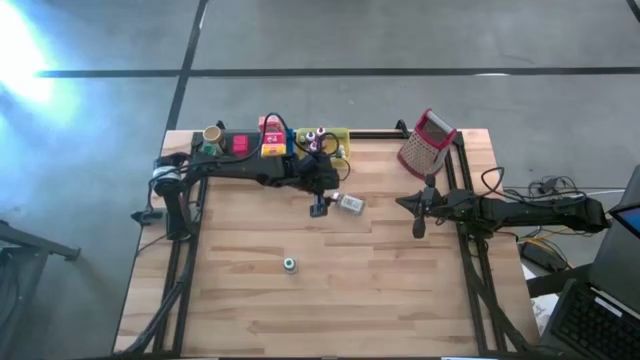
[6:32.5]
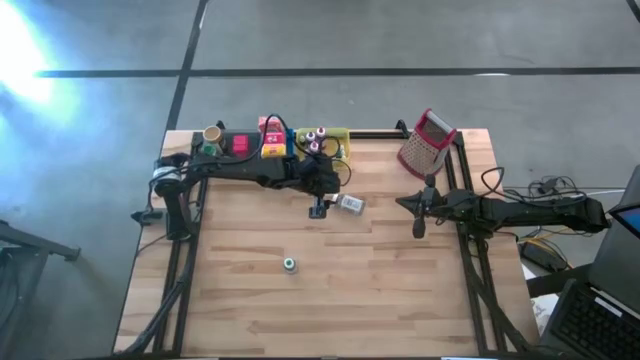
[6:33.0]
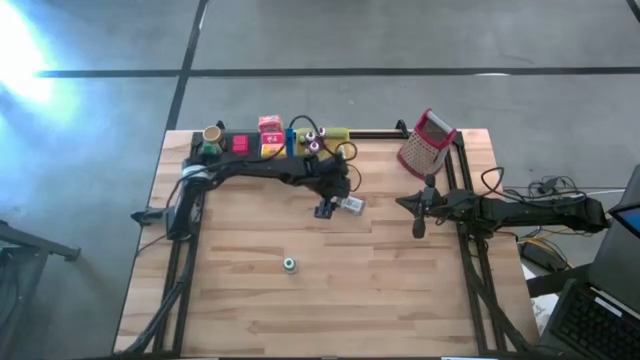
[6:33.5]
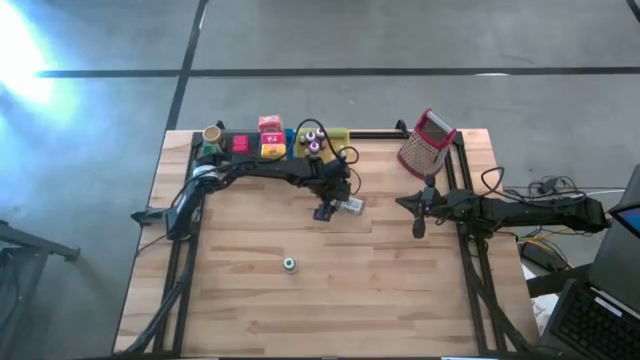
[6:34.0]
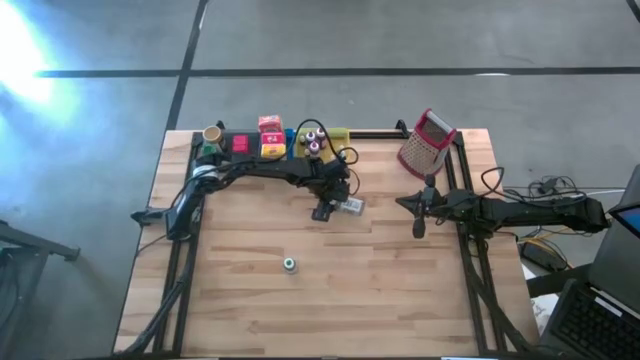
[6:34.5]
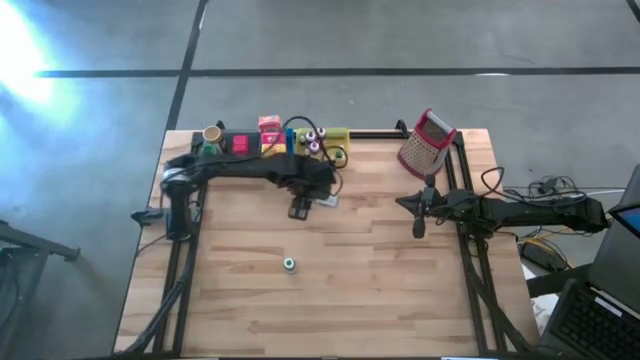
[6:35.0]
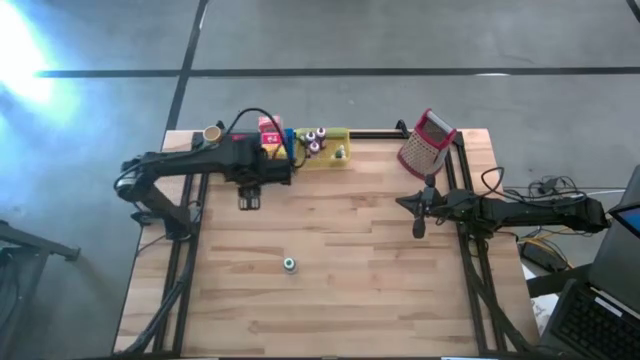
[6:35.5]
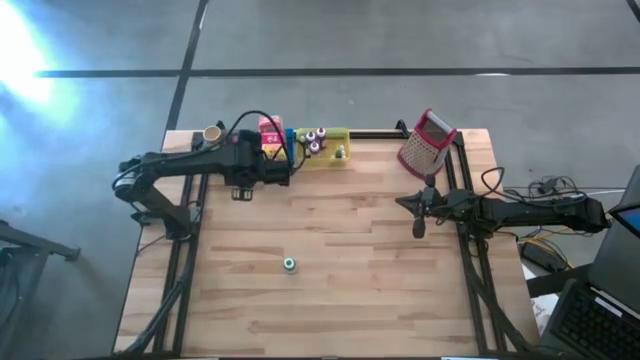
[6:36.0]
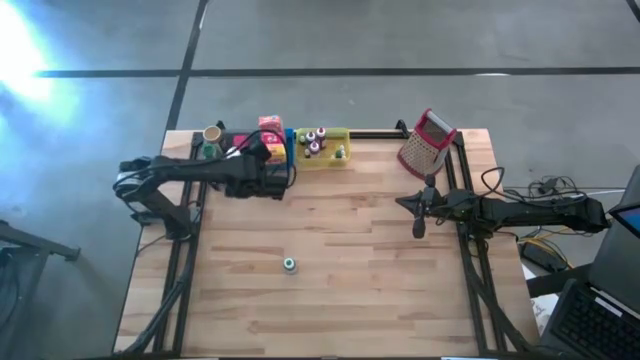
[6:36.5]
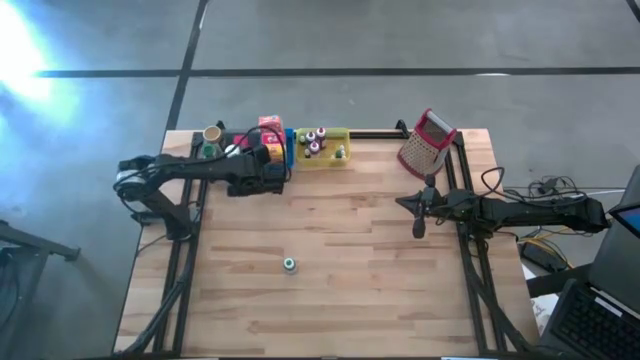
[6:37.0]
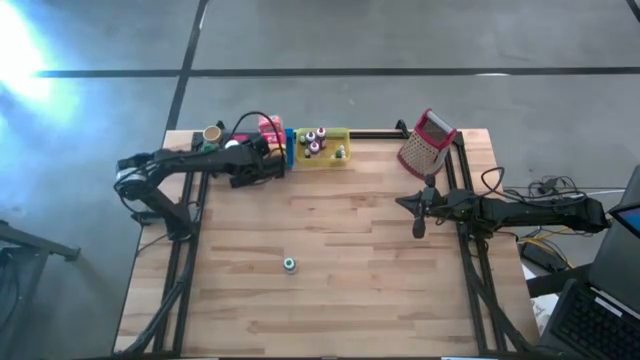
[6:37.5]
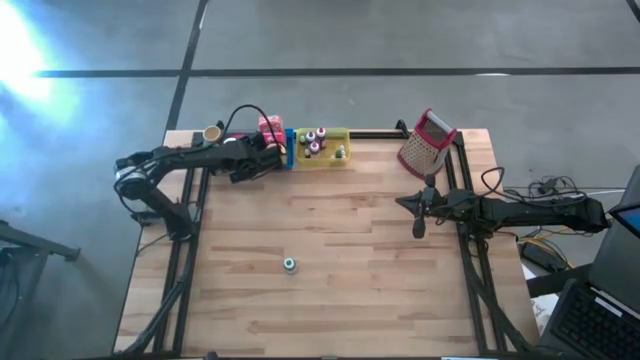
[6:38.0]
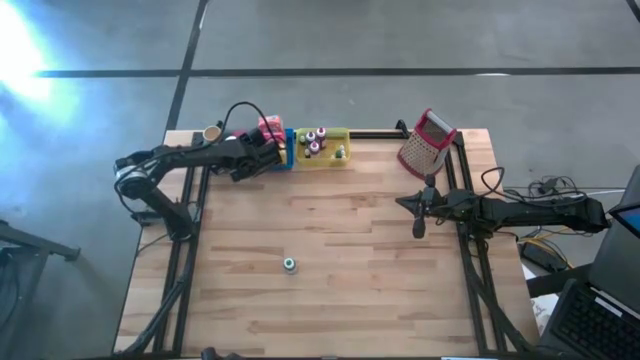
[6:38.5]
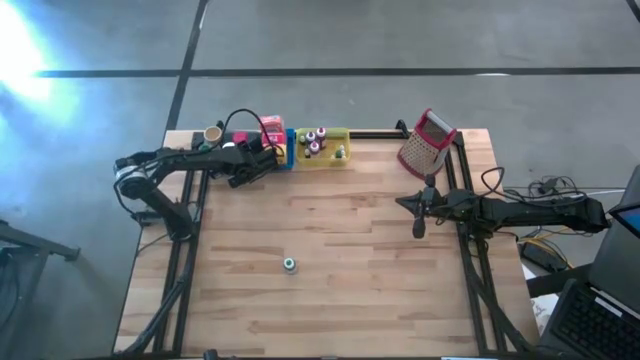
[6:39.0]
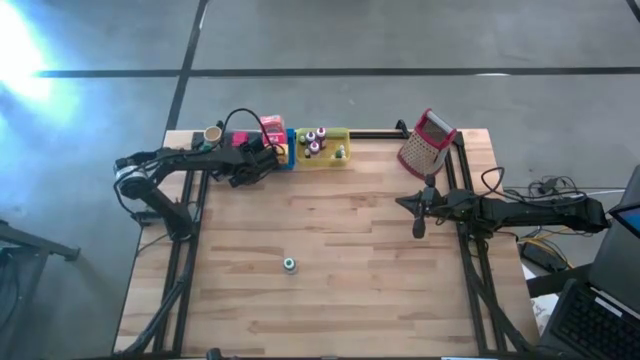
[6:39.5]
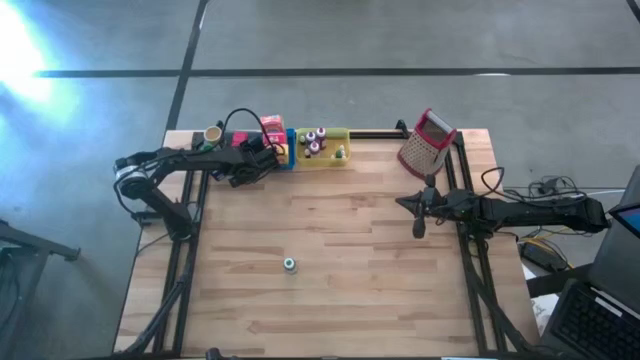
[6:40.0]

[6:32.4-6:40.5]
Task: Pick & Place Kitchen Items
Put the white seasoning bottle into the blue bin

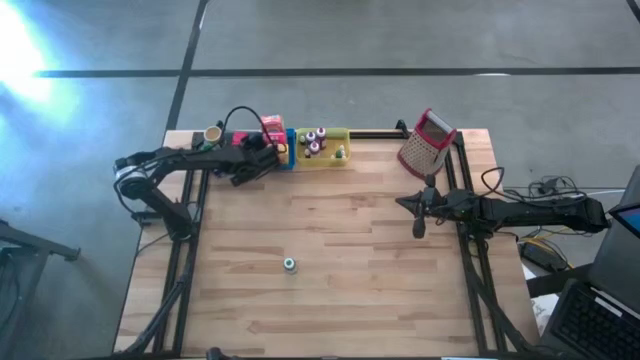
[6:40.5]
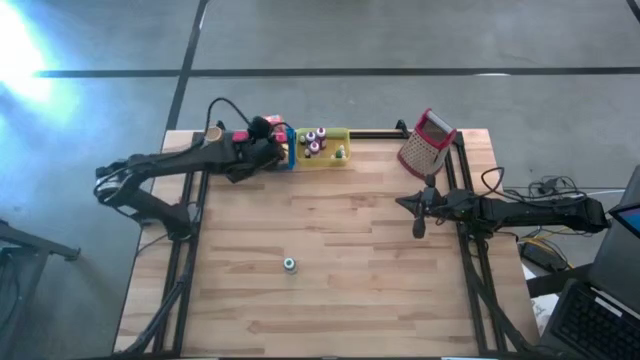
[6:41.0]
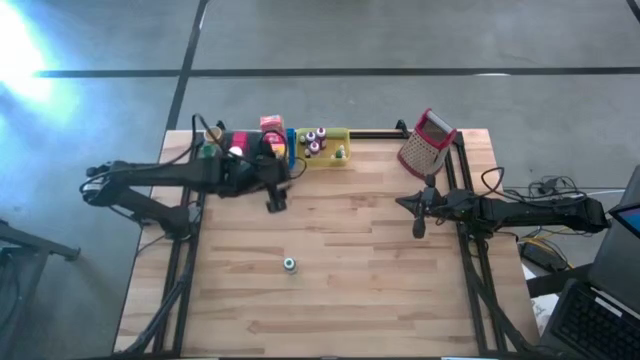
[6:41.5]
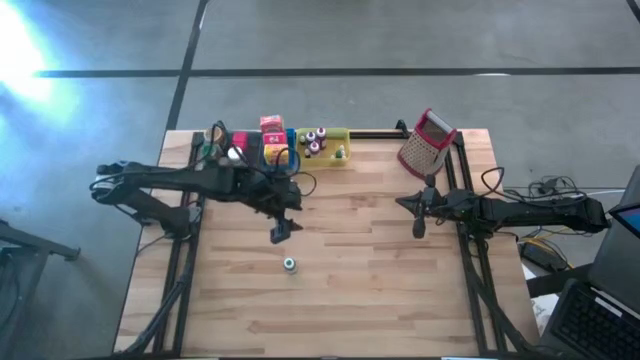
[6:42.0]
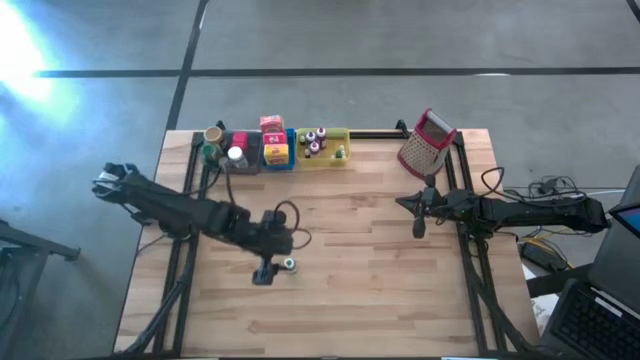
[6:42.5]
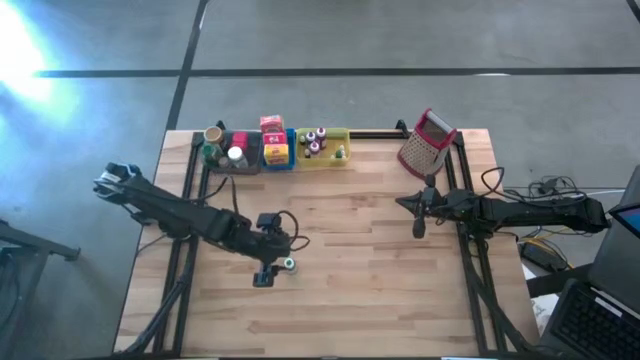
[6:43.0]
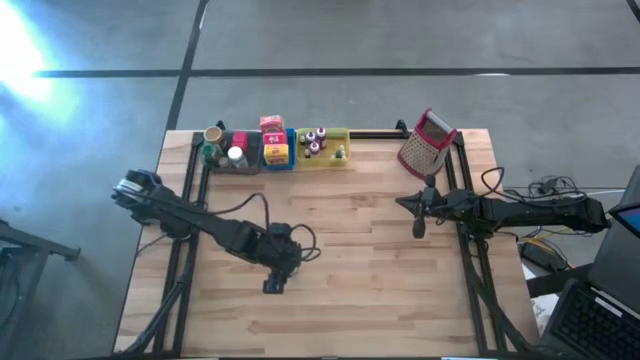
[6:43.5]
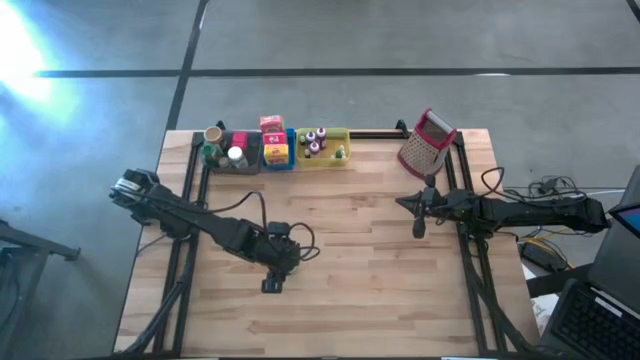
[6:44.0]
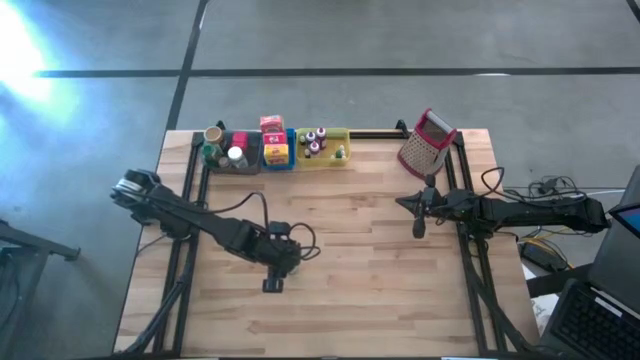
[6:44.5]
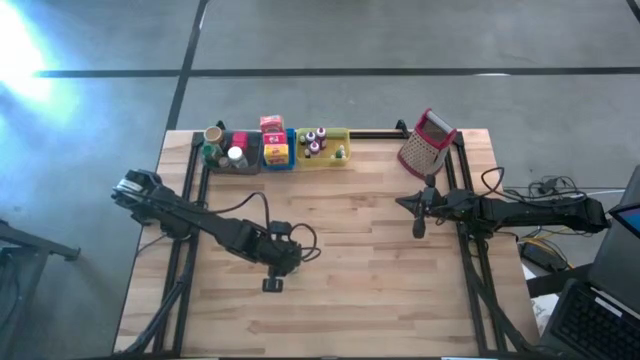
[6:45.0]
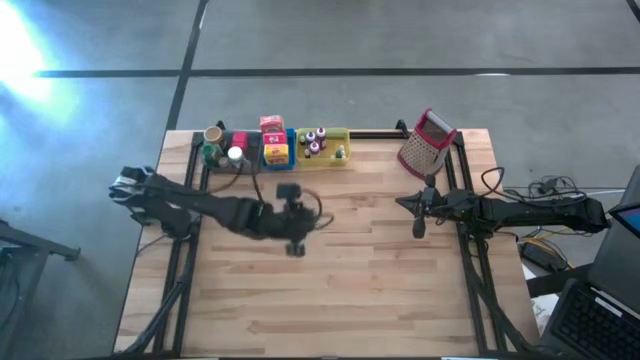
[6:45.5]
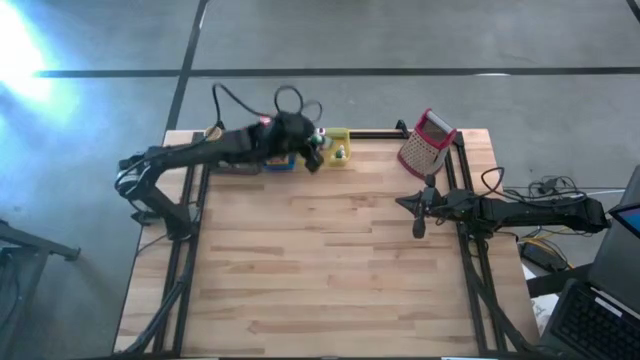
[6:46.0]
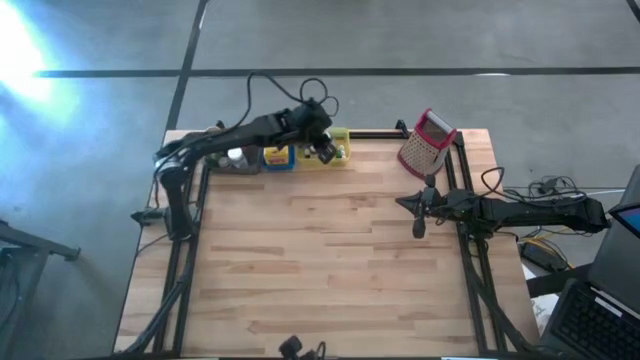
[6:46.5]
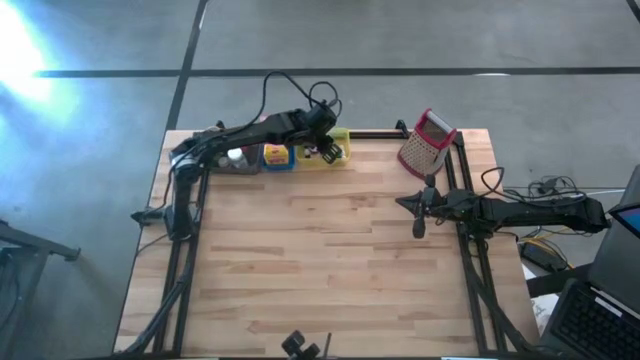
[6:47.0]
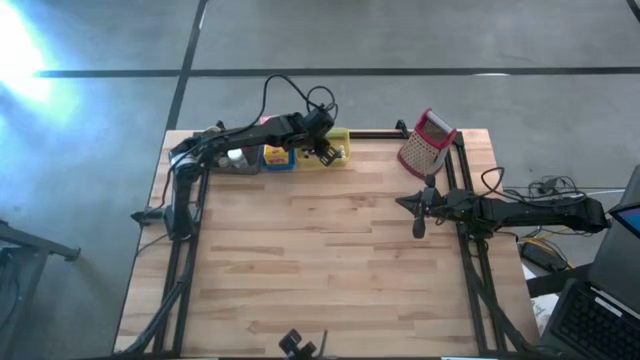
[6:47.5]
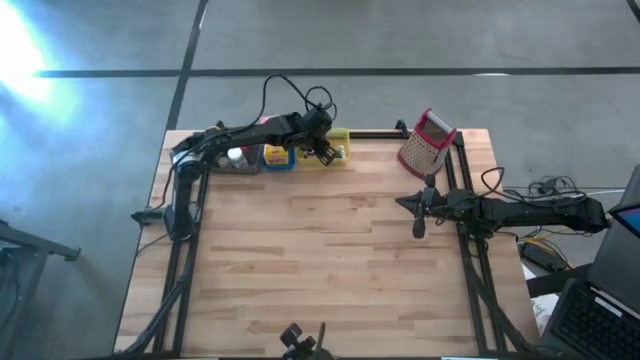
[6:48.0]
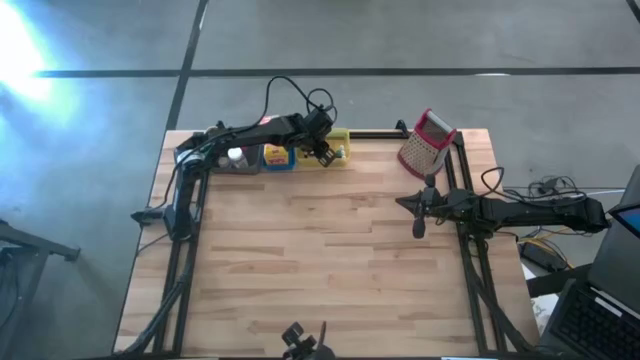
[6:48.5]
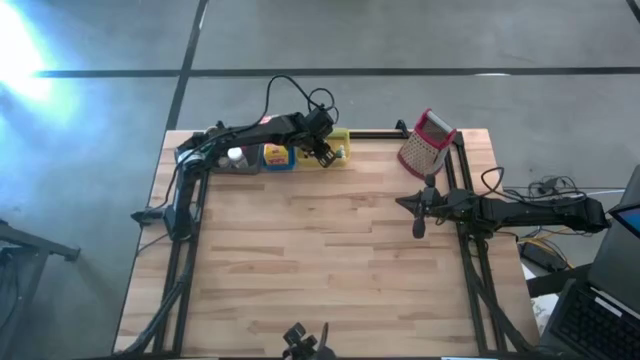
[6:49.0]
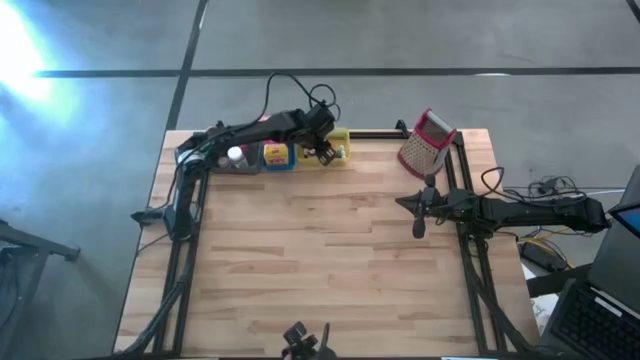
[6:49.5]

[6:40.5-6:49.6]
Put the large green food coloring bottle into the yellow bin

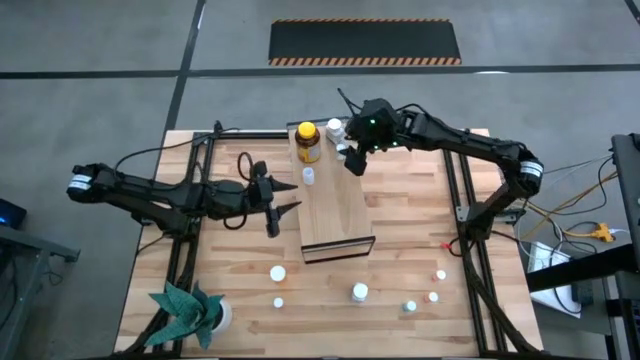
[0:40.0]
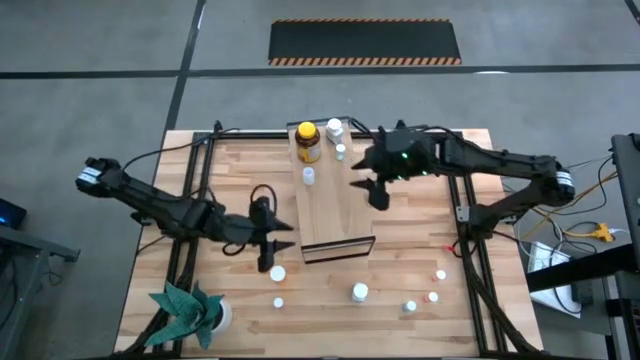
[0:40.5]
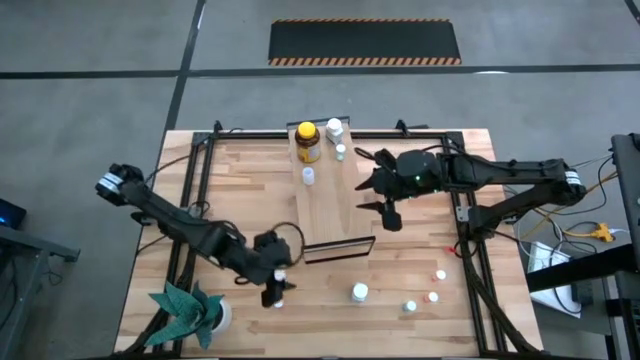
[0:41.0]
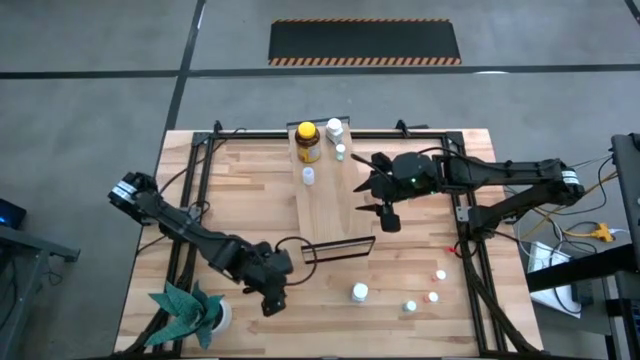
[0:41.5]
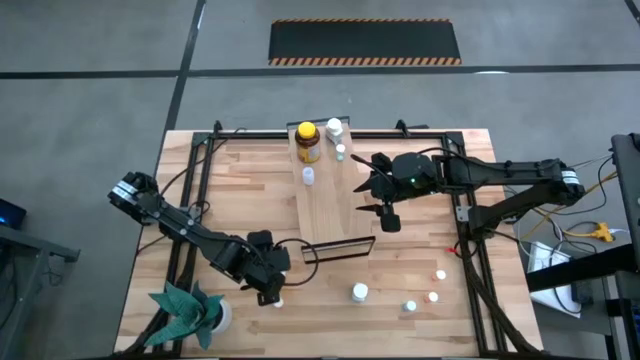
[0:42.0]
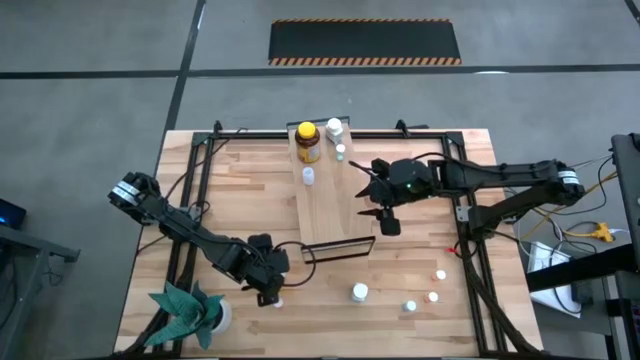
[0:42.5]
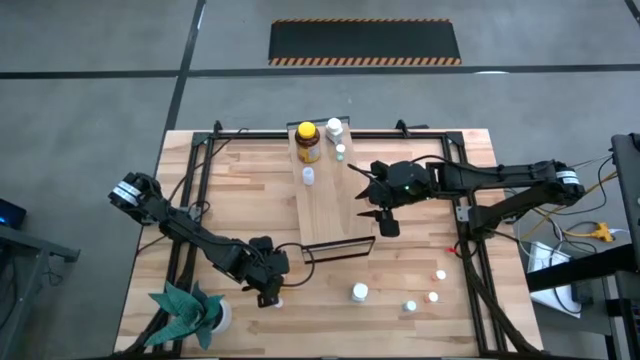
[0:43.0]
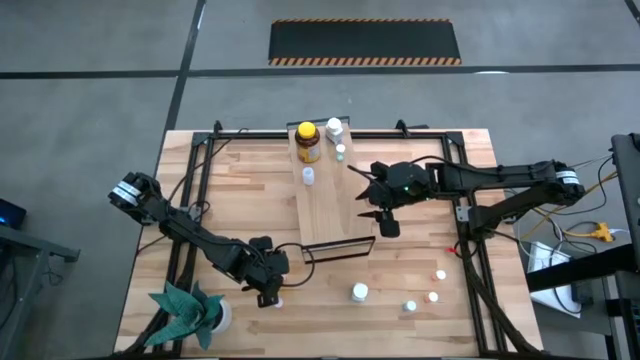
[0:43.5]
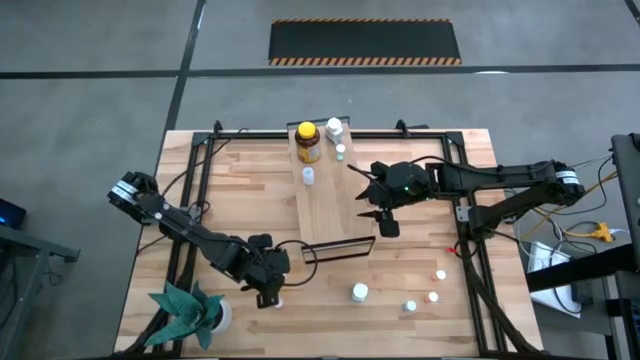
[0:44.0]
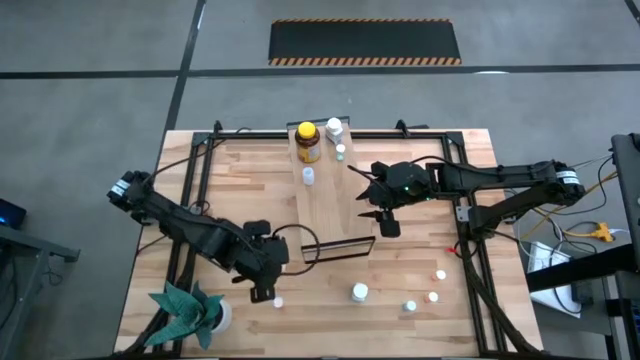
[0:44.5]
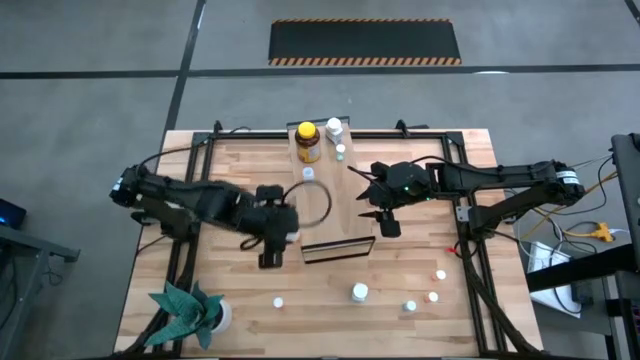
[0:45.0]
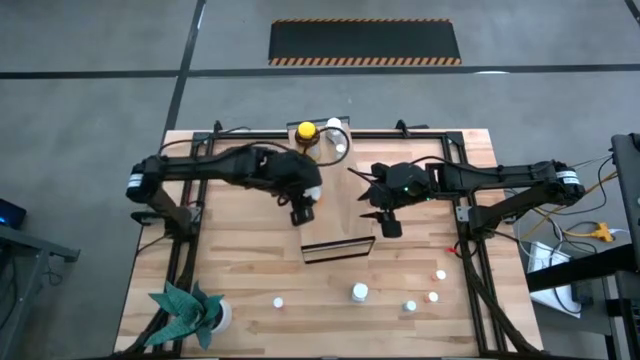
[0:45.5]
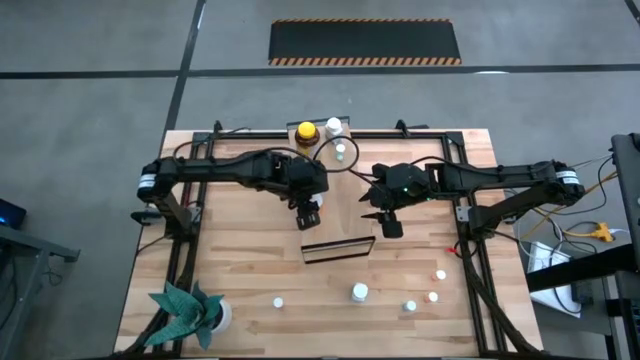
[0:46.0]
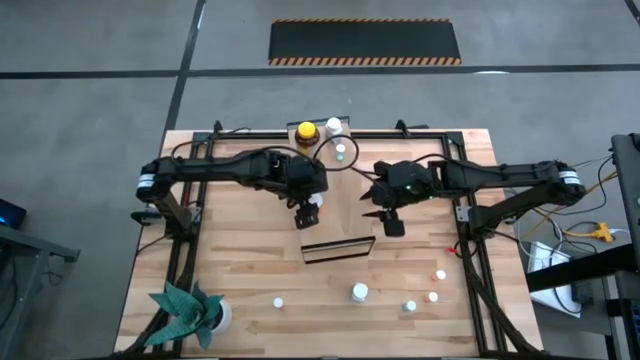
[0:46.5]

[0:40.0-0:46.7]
Task: Pick and place medicine bottles onto shelf by color
Put the orange pill bottle on the shelf
